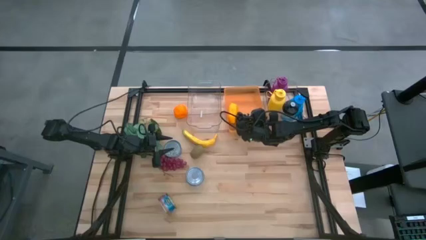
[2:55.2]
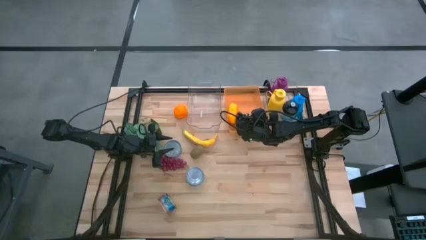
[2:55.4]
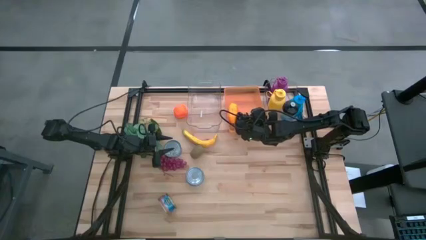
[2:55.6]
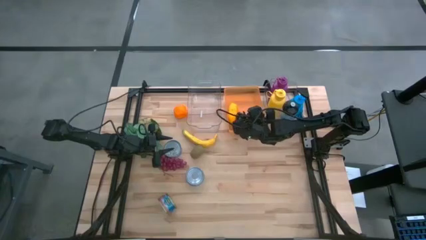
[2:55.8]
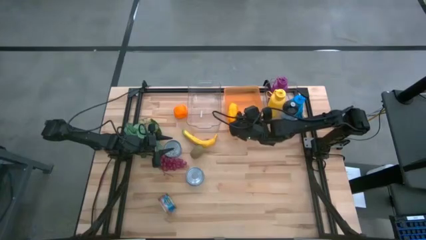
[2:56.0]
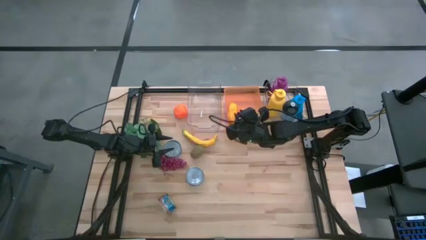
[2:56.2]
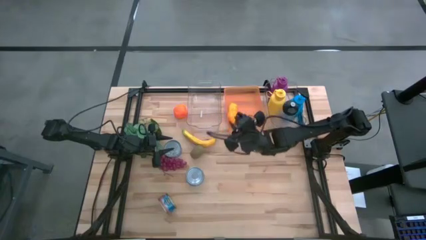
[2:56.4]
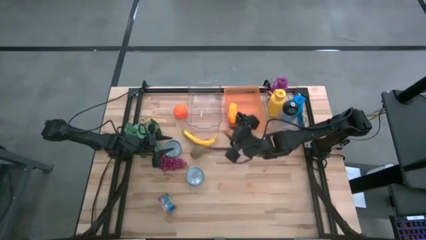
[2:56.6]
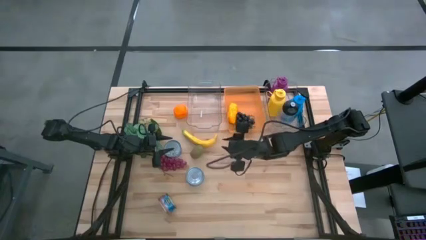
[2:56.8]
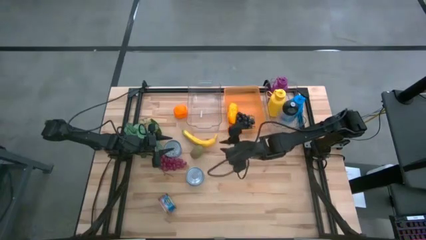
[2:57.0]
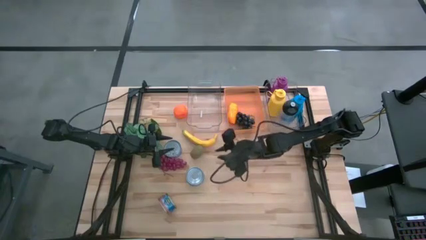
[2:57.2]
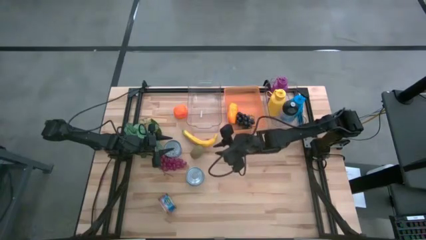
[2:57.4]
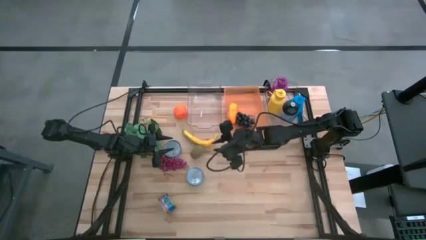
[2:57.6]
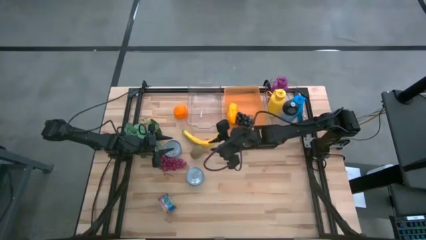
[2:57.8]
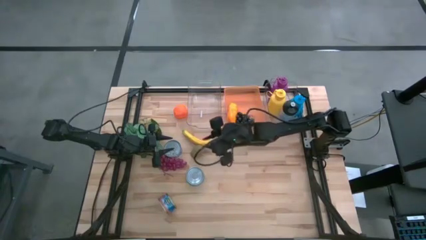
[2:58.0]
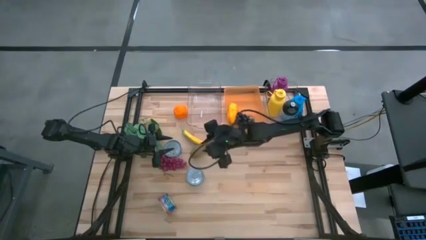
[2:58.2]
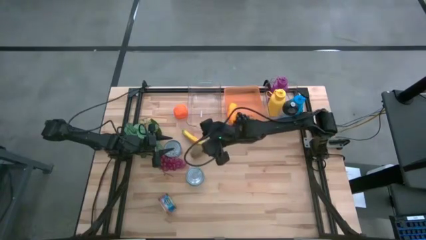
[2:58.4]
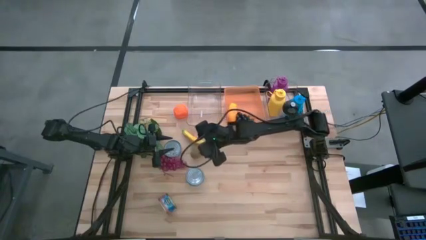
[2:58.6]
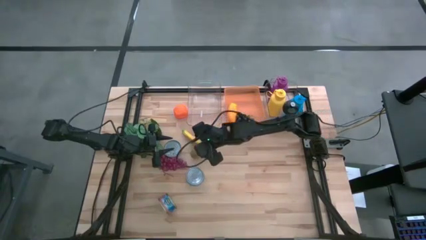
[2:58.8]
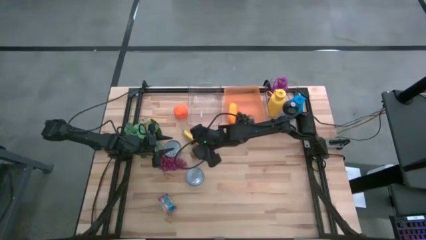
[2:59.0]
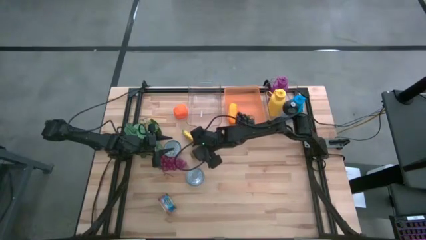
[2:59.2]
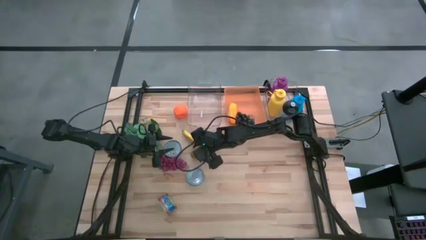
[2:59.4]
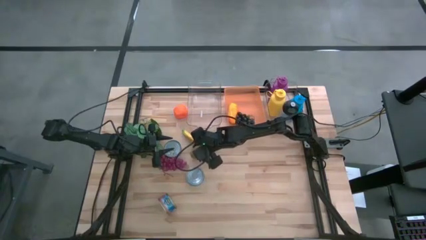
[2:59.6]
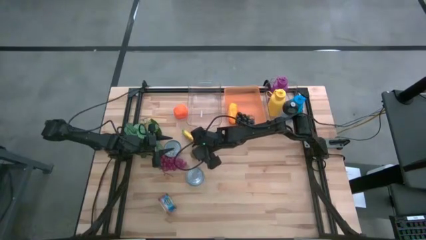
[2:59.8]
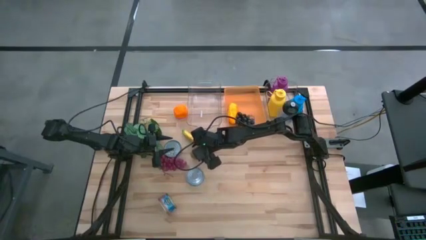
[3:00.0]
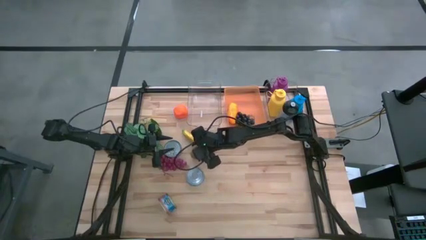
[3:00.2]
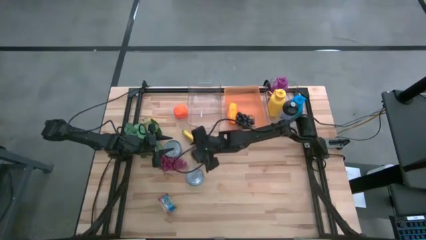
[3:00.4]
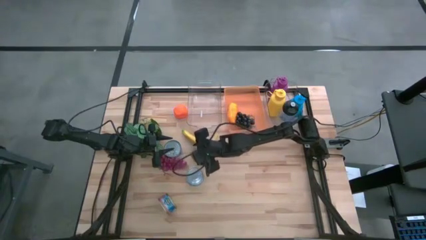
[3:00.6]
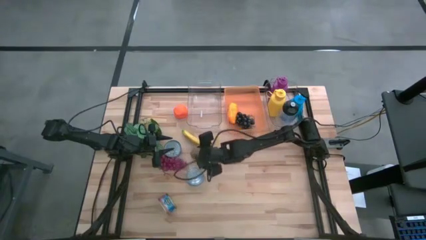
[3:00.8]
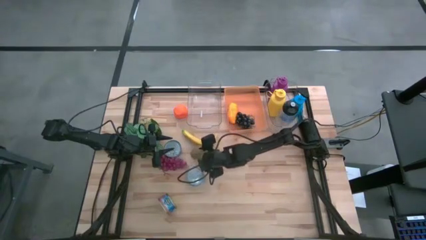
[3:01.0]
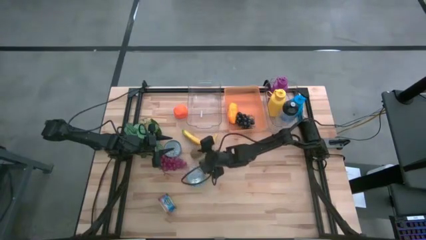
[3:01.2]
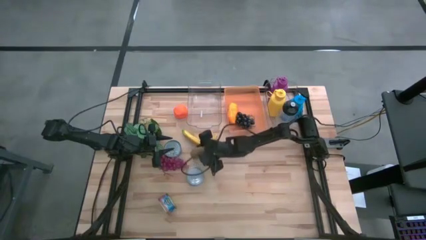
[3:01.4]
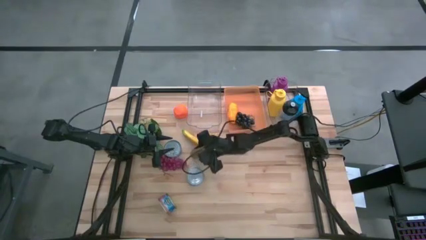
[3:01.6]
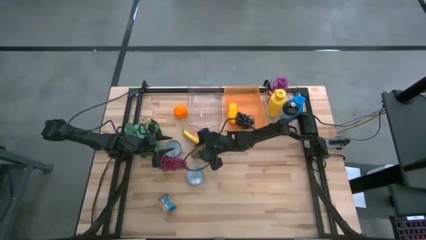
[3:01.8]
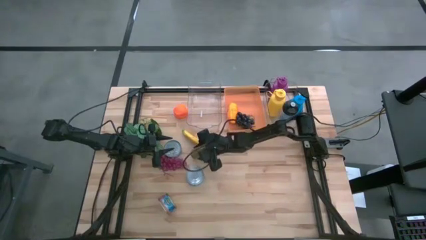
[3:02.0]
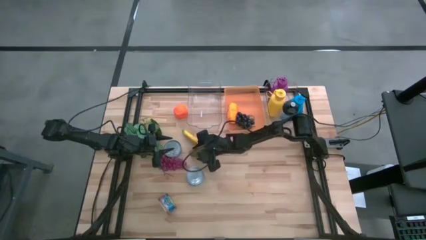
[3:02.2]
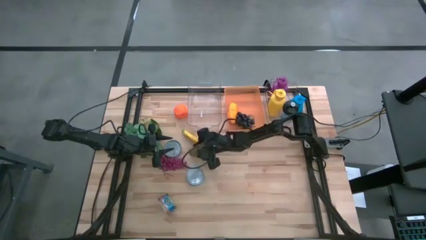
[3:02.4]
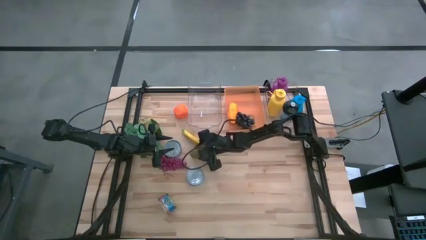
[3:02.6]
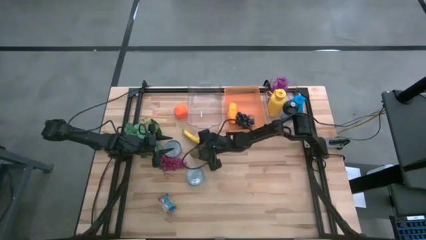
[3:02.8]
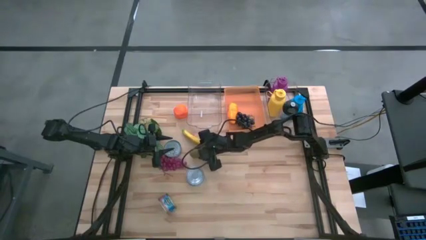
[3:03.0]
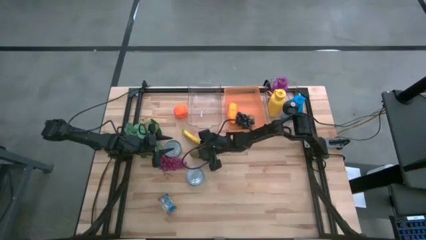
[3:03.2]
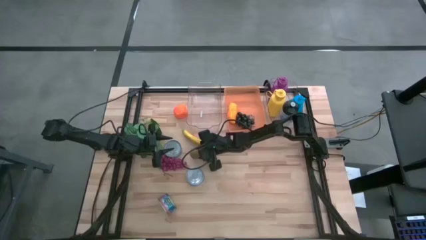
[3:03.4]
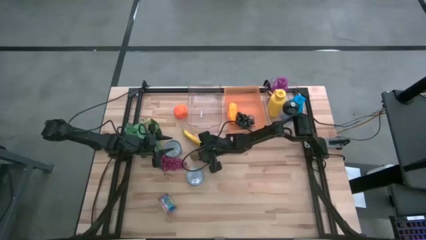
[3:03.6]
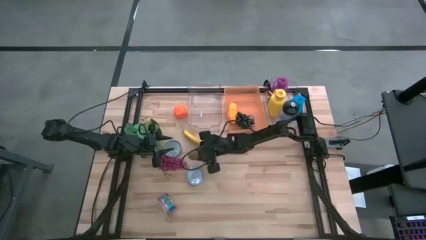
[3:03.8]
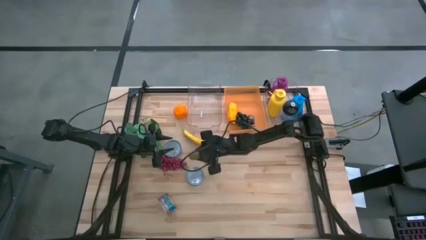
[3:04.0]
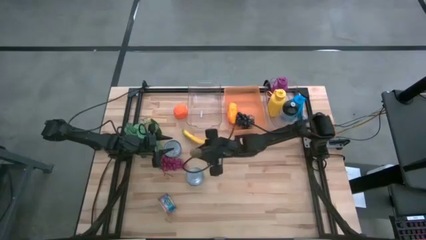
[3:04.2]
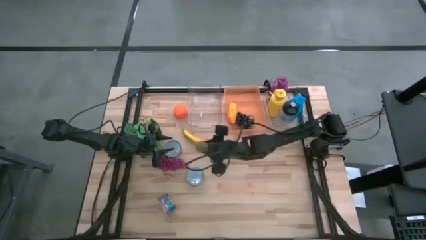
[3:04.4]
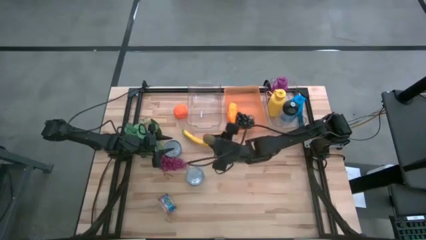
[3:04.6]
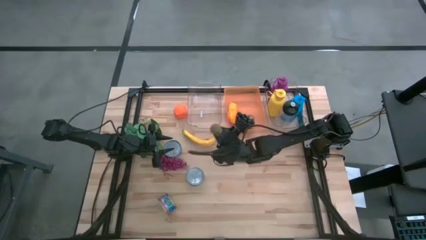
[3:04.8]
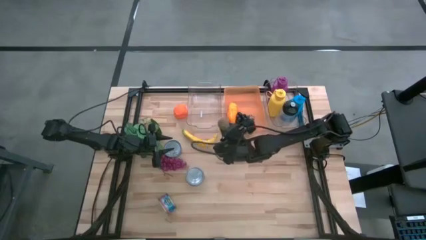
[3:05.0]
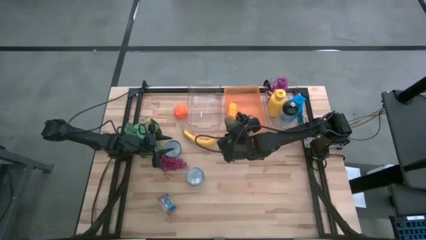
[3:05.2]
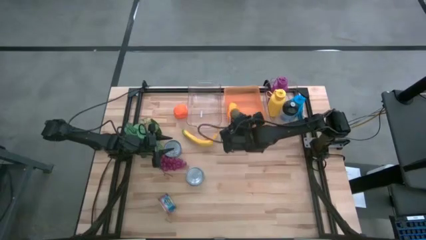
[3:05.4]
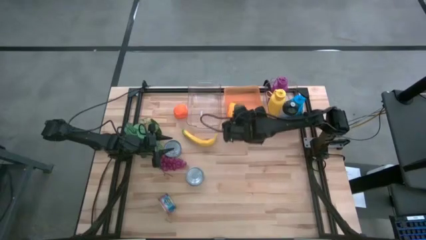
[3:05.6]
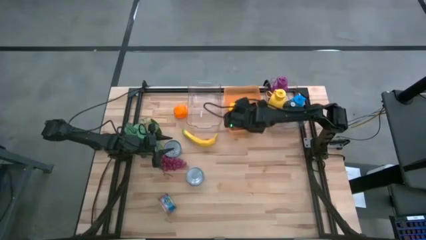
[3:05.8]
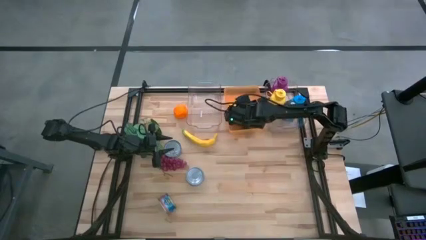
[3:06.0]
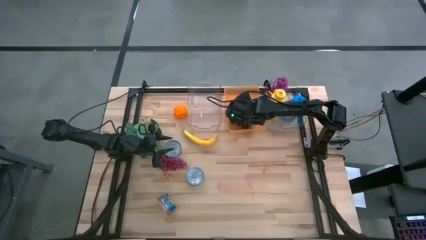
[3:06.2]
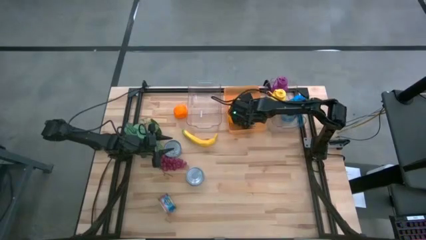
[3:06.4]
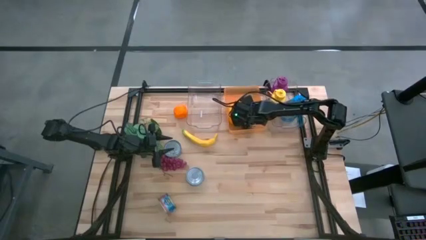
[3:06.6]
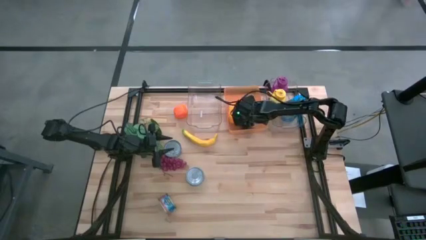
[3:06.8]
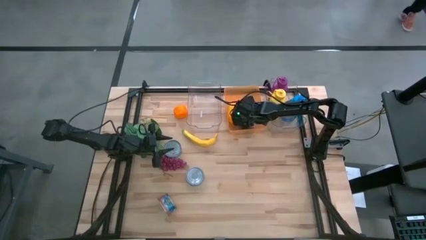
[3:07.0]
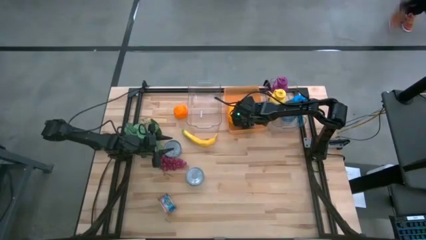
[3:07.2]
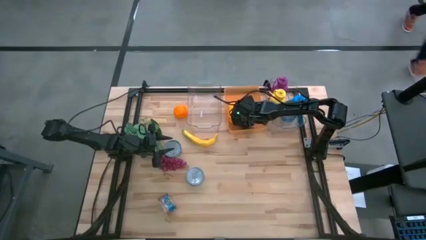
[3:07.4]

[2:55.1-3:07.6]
Task: Pick & Place Food Item
Put the brown kiwi into the orange bin

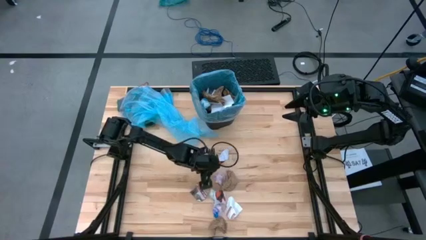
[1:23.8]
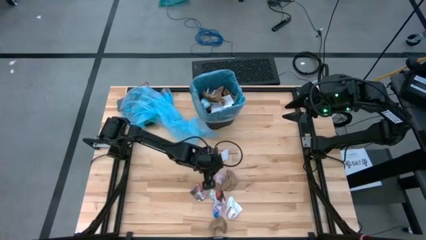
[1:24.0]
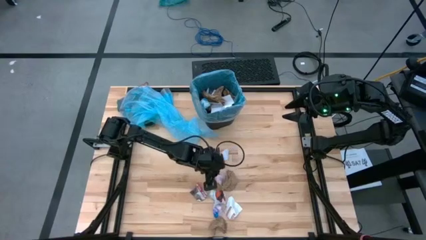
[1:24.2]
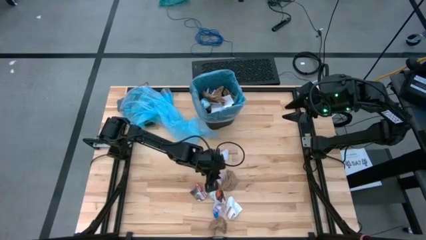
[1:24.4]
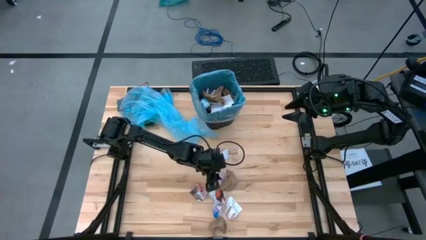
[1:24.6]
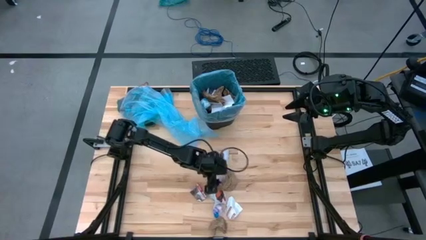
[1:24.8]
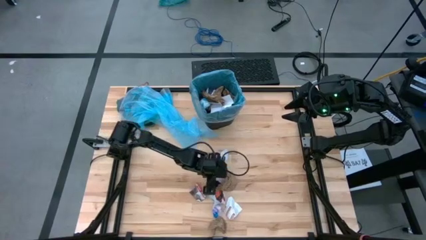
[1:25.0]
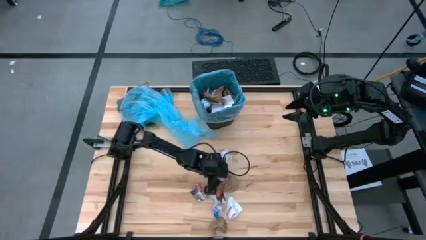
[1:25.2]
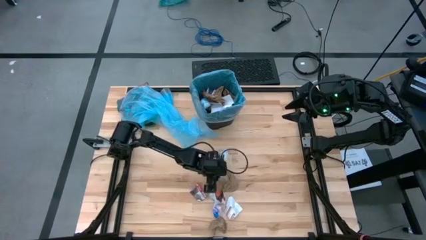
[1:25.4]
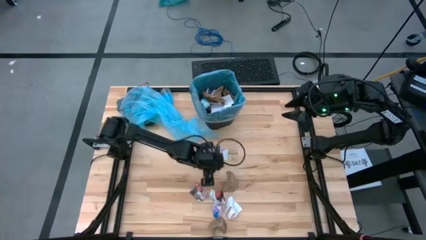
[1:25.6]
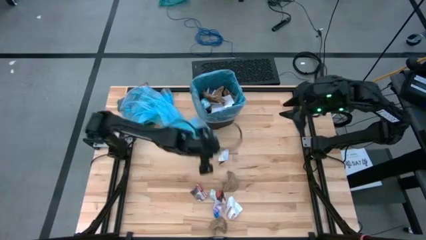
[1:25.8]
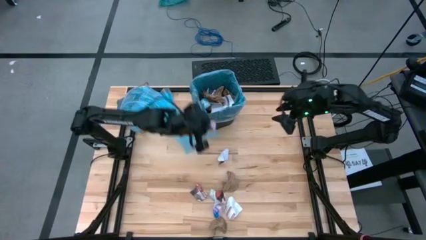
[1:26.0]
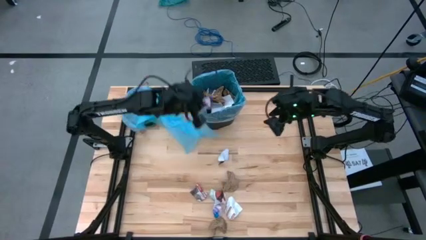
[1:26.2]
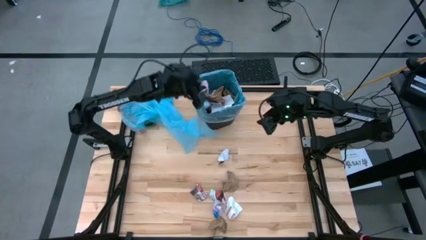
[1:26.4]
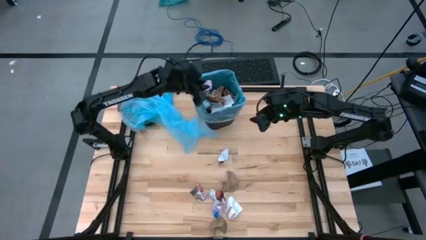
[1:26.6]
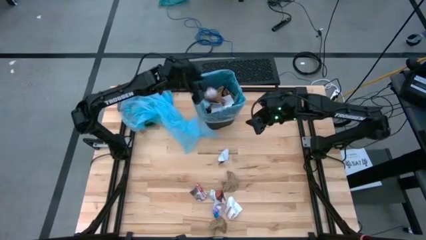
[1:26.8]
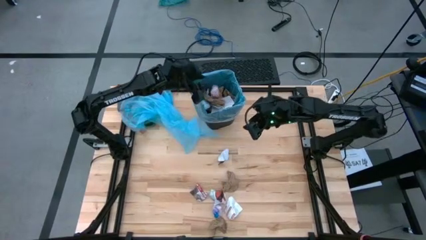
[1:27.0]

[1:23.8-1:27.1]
Task: place trash/remove bag and relplace
Put the pink crumpled plastic bag into the trash bin
